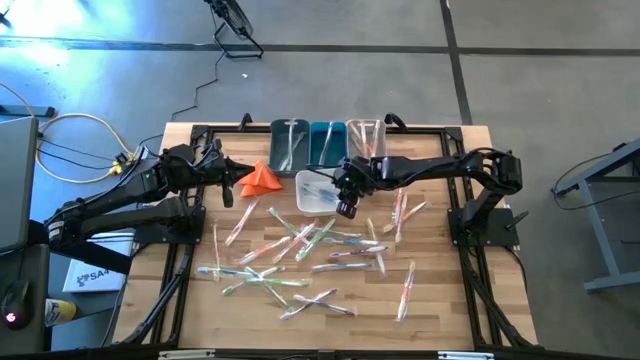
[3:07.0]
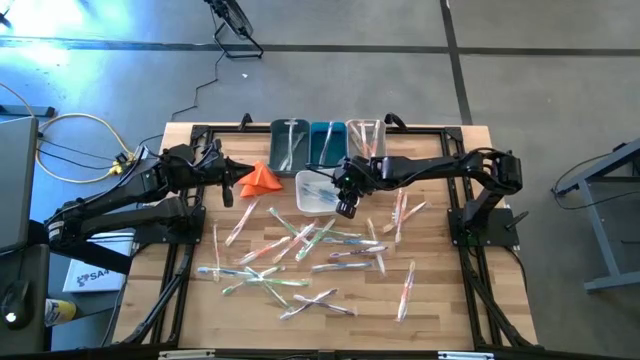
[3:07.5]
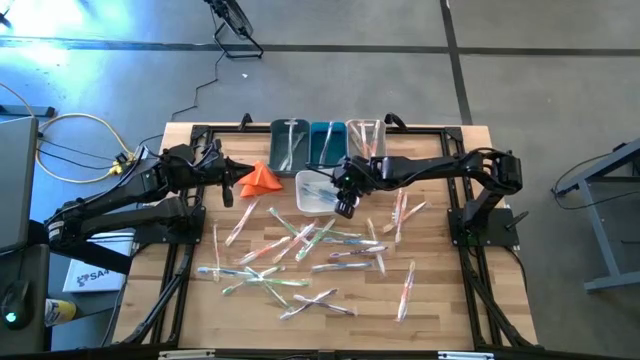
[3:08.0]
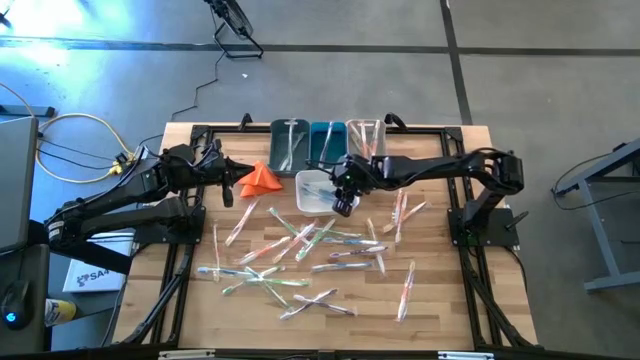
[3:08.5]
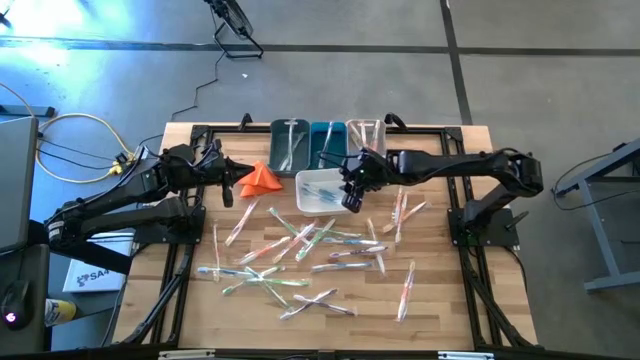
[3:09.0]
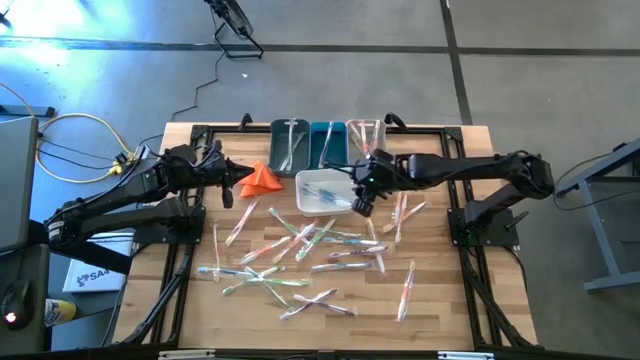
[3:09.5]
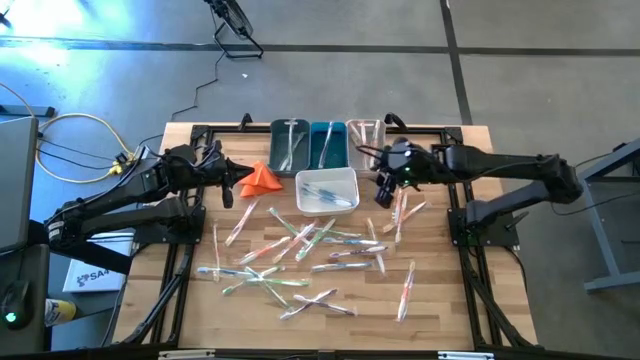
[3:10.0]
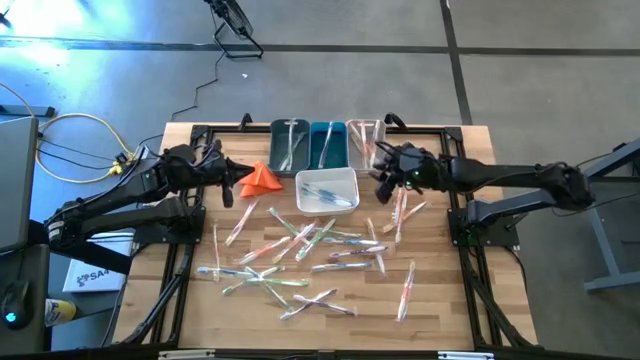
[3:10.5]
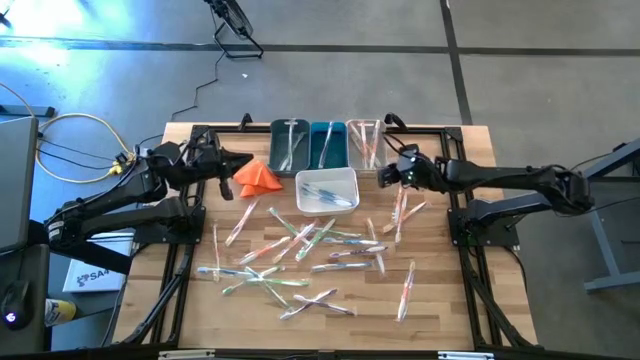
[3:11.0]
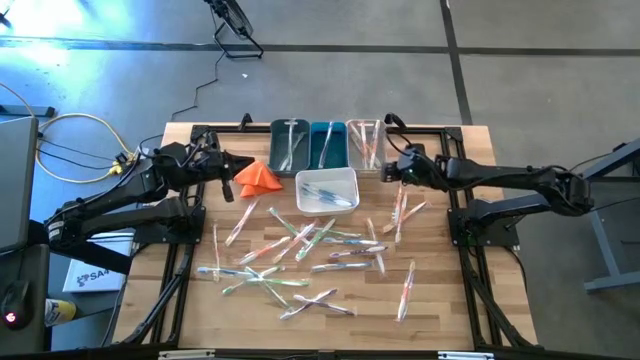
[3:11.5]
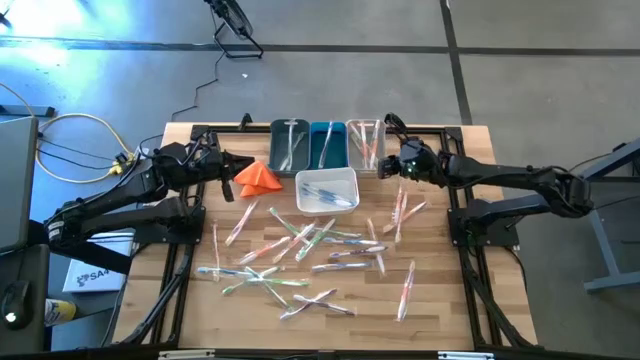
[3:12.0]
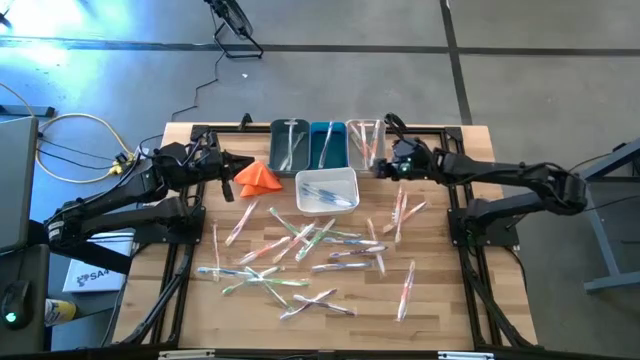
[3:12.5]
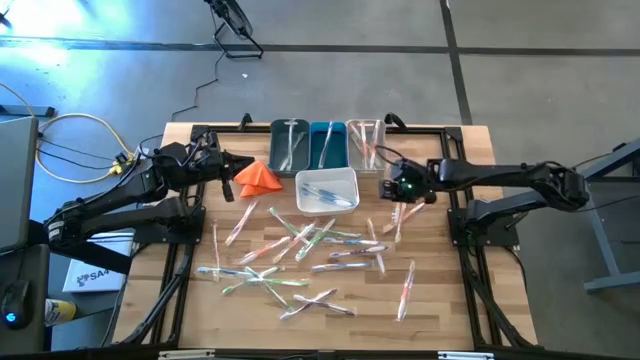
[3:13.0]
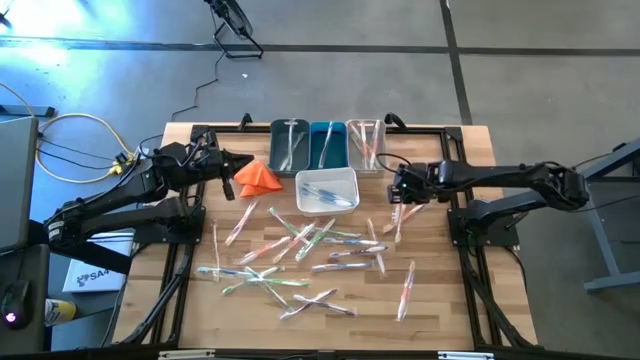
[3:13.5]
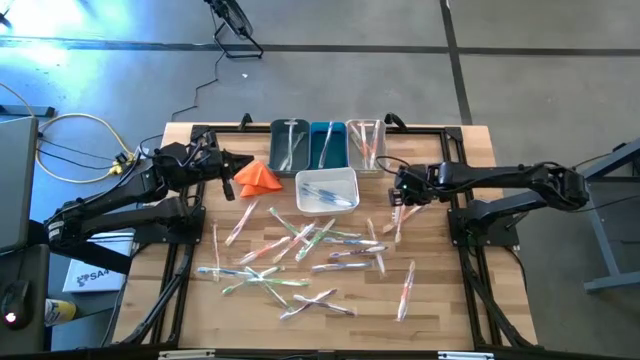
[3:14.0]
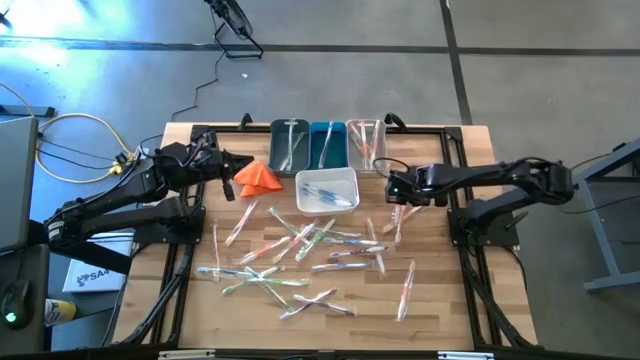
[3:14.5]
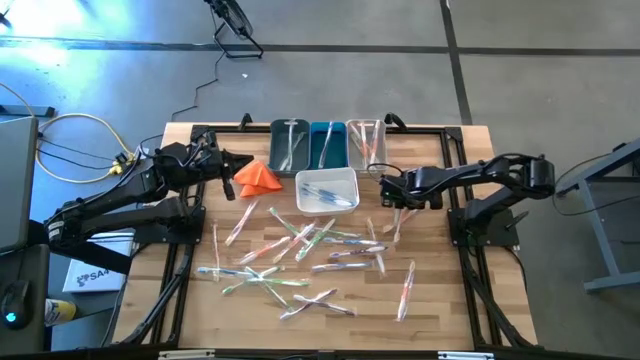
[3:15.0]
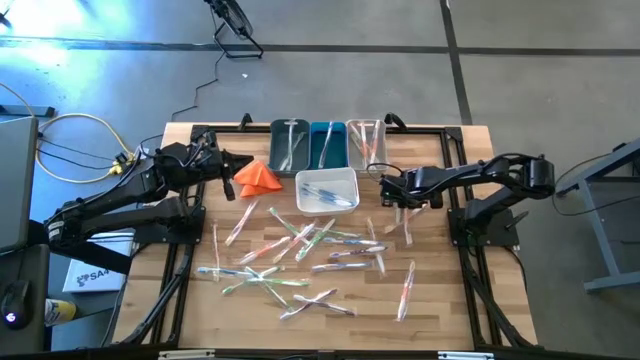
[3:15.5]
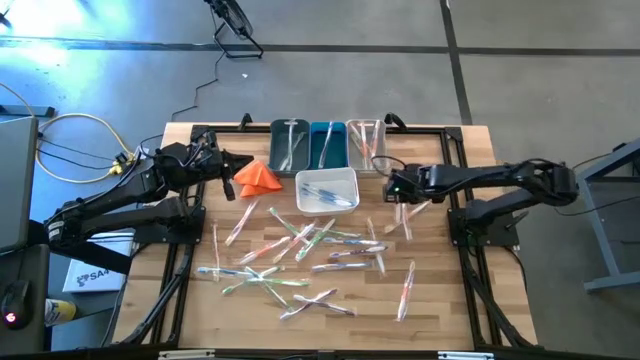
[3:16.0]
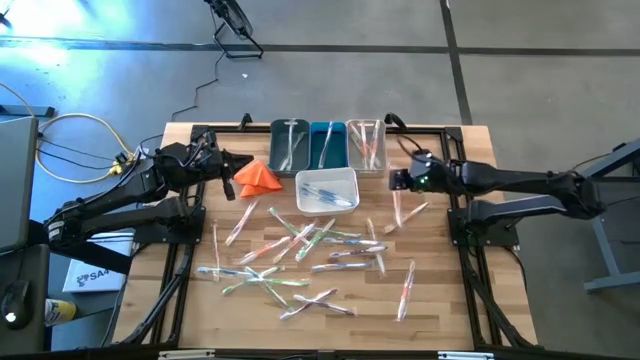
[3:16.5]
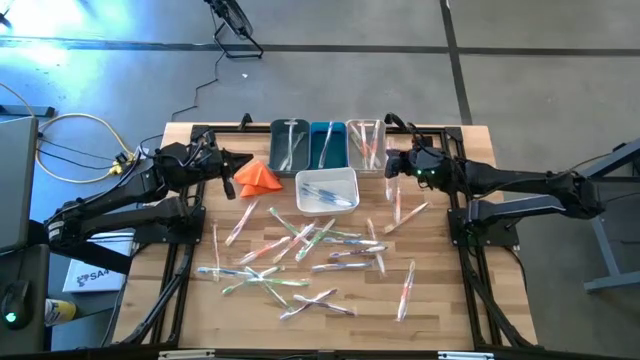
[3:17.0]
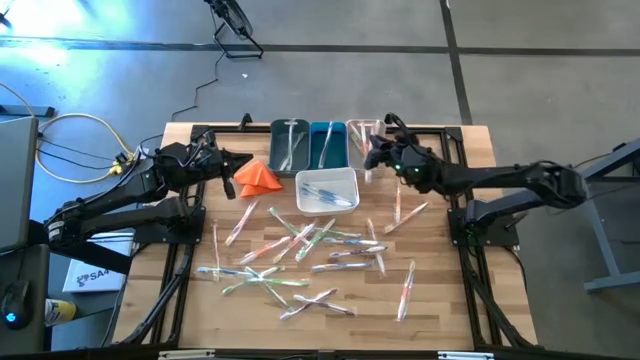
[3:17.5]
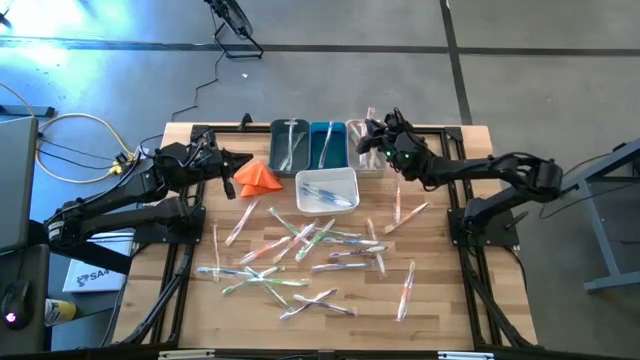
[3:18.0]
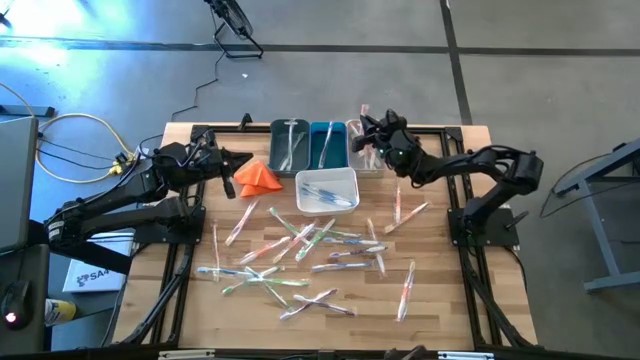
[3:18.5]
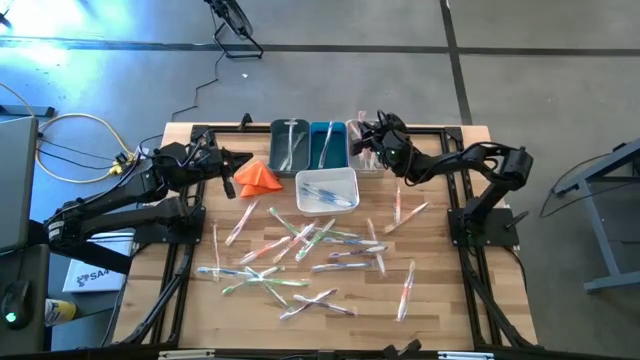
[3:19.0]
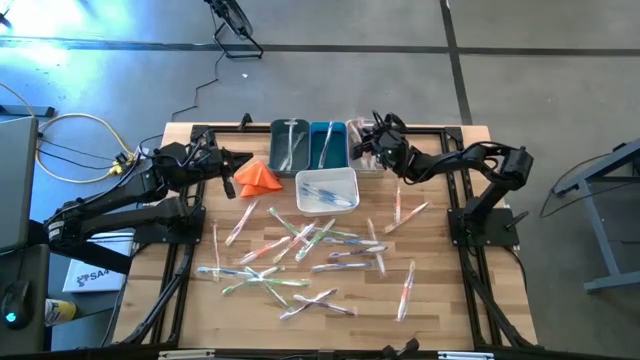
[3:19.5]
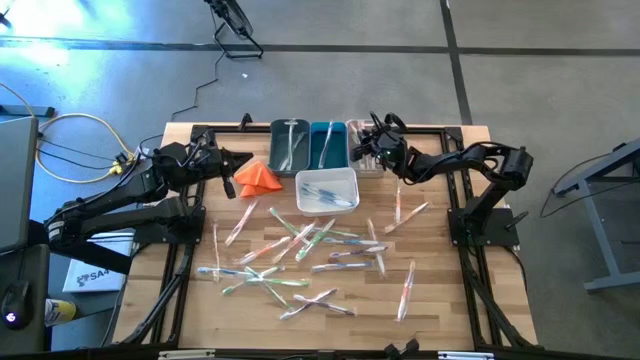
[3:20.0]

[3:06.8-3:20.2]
Task: Pick & Place Toothbrushes
Put the orange toothbrush into the gray bin

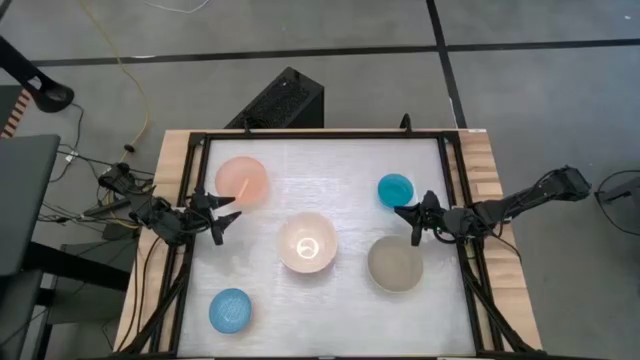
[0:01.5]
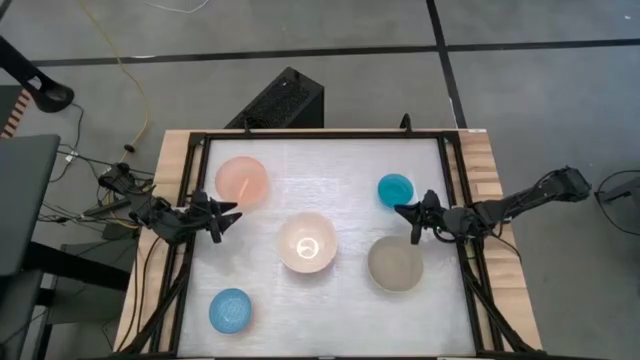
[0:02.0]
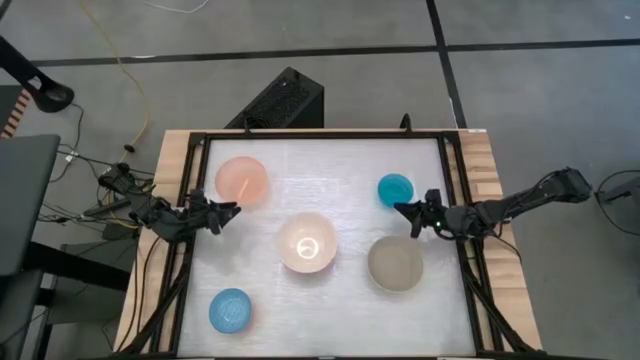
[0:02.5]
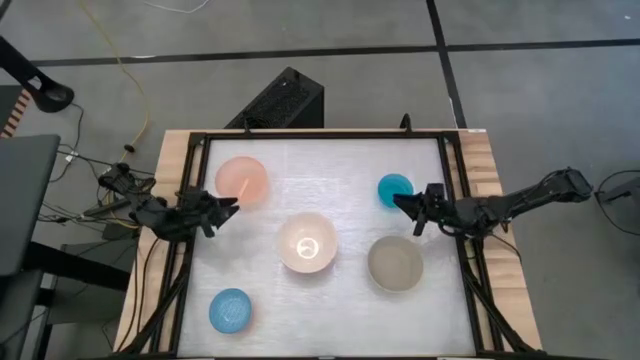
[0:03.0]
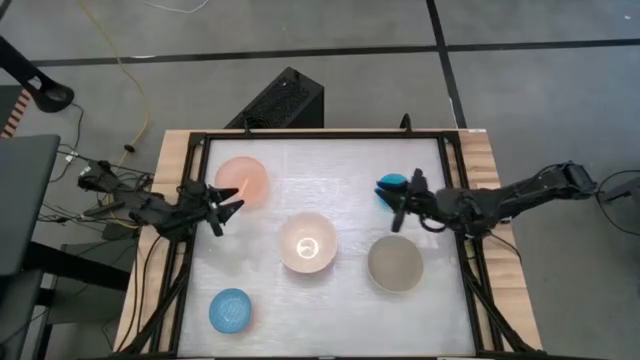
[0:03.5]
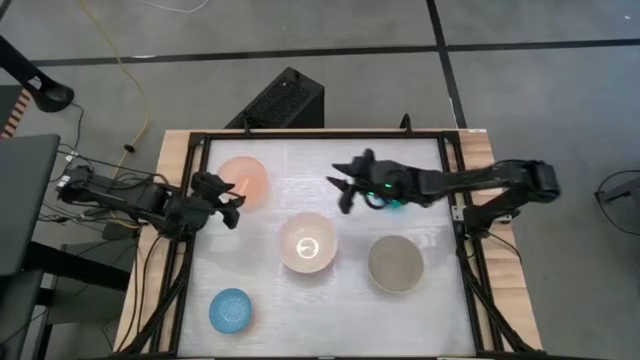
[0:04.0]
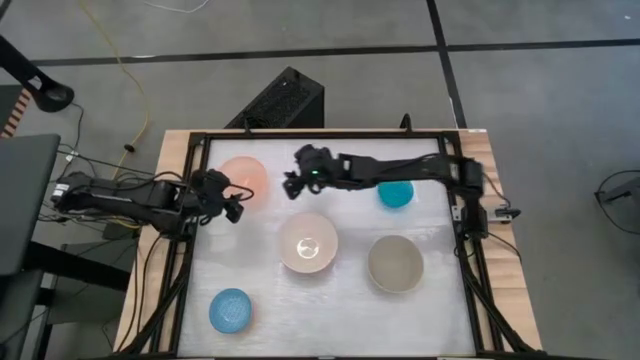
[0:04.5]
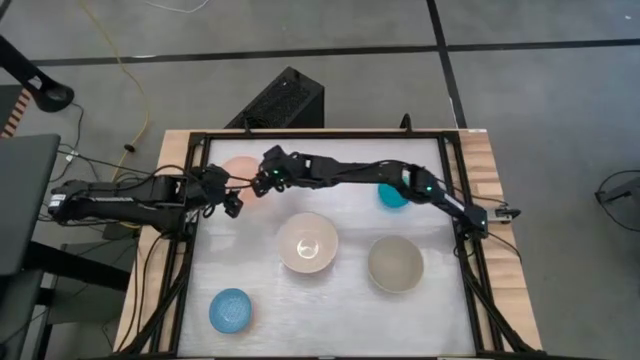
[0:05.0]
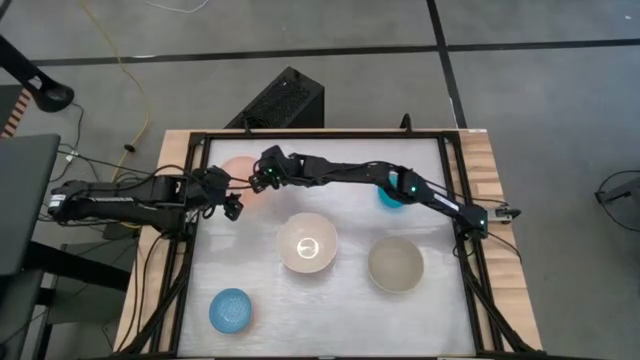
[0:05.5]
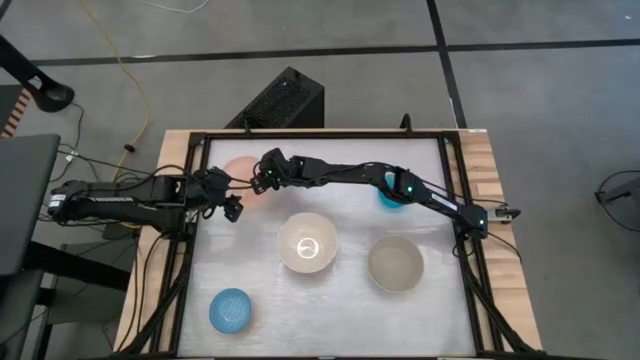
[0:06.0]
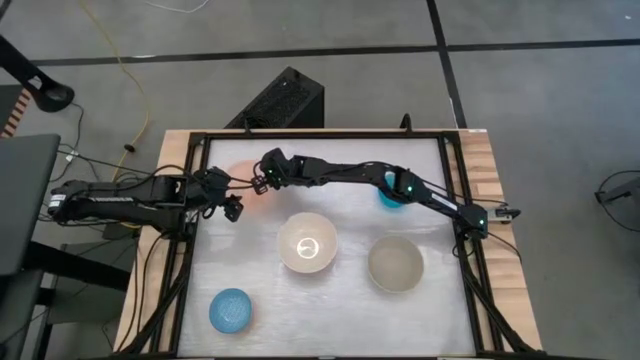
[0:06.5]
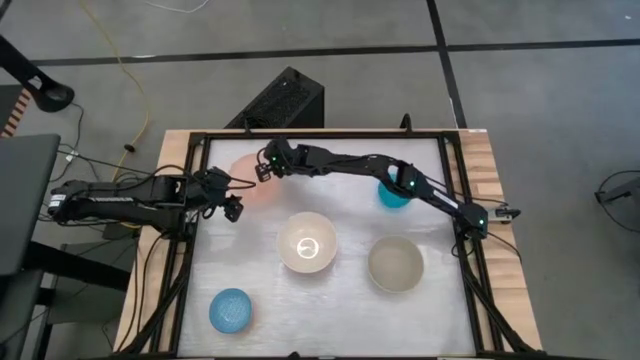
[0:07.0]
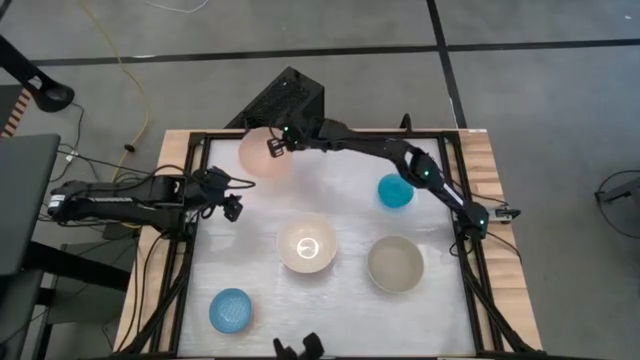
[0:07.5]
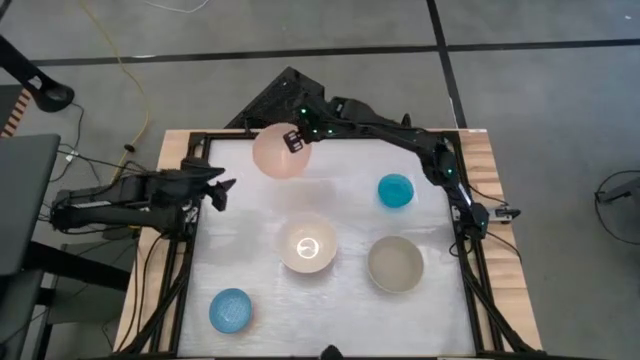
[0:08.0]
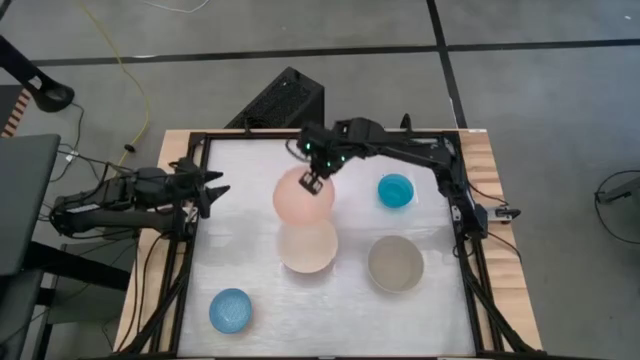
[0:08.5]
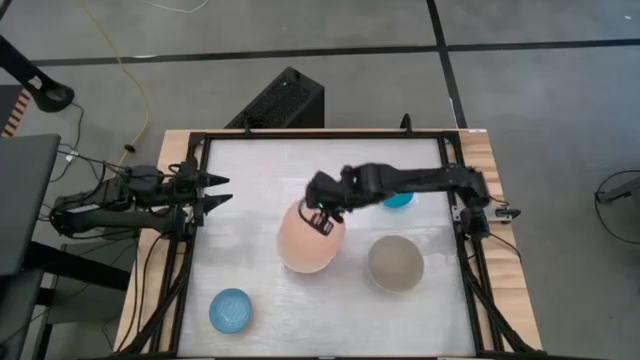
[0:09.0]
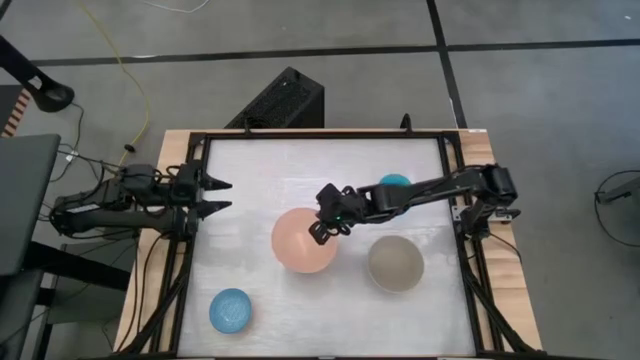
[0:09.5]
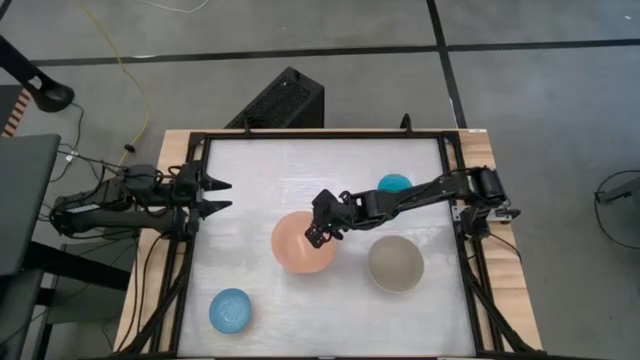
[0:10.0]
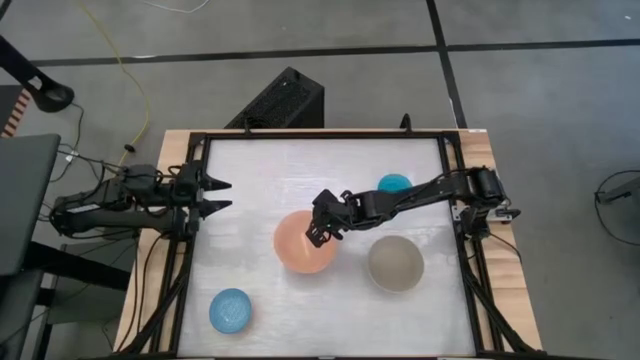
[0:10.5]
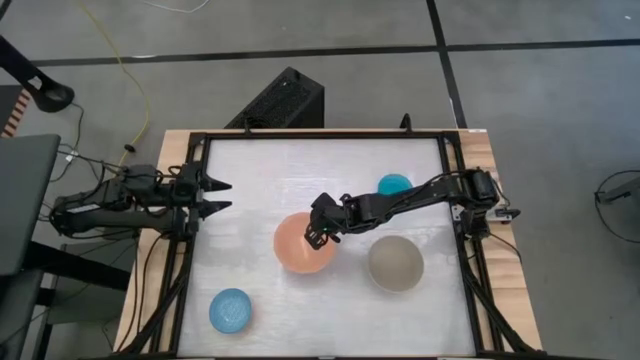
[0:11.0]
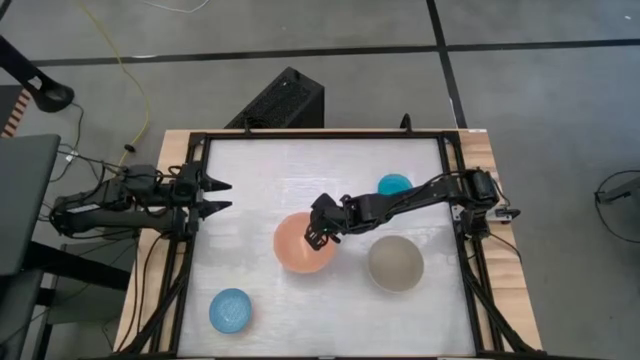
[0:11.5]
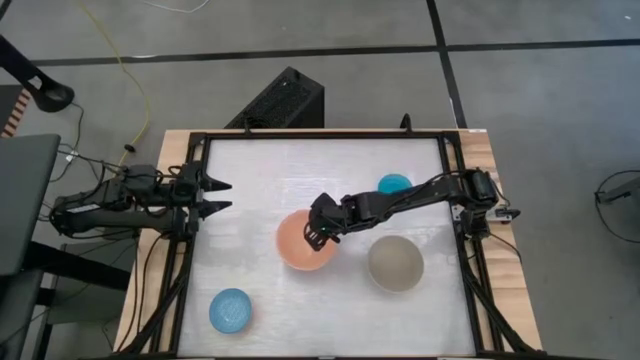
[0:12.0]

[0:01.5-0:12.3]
Task: Nest bowls inside each other by size order
Stack the transparent orange bowl on top of the white bowl
